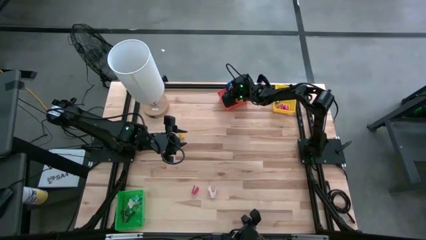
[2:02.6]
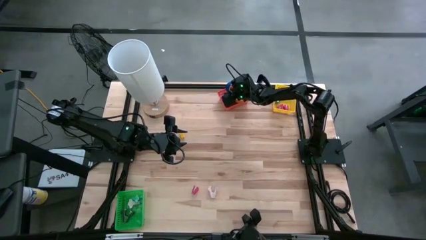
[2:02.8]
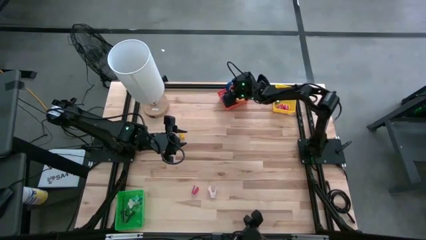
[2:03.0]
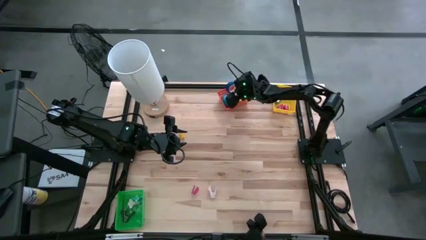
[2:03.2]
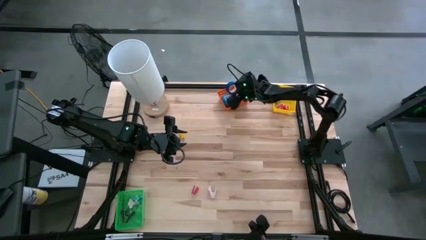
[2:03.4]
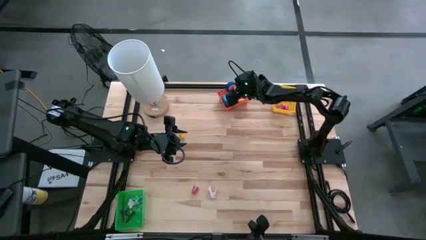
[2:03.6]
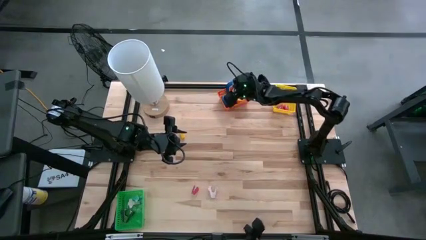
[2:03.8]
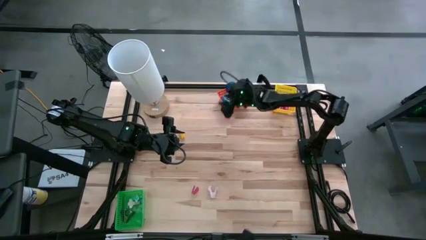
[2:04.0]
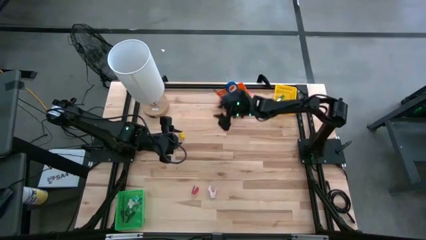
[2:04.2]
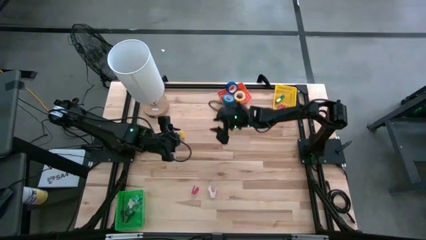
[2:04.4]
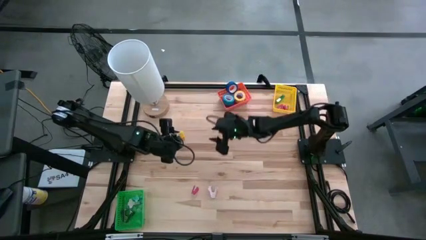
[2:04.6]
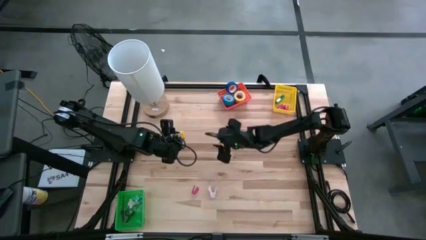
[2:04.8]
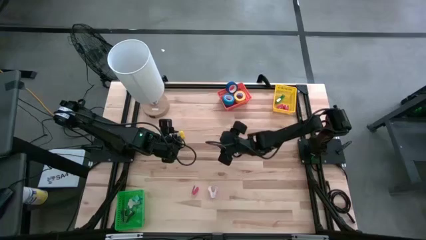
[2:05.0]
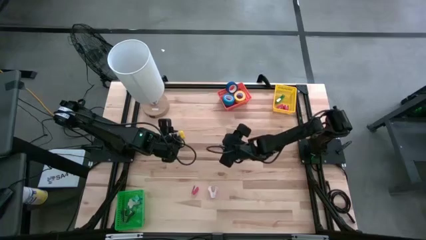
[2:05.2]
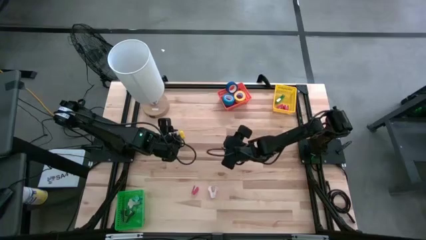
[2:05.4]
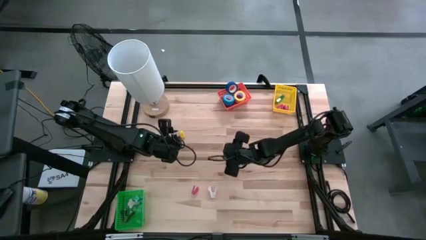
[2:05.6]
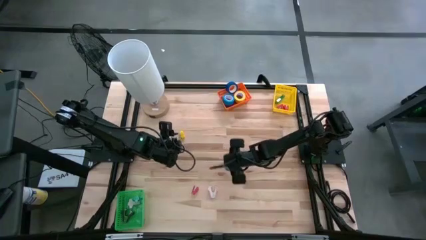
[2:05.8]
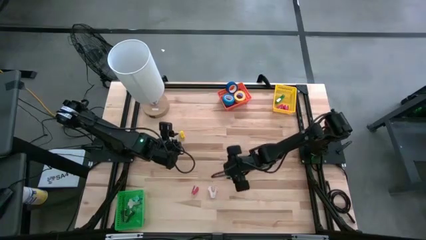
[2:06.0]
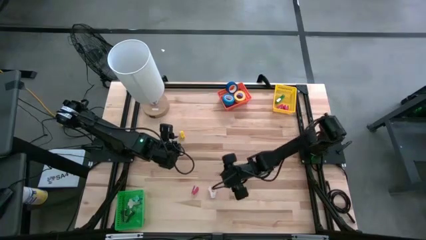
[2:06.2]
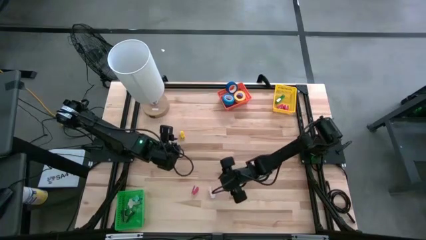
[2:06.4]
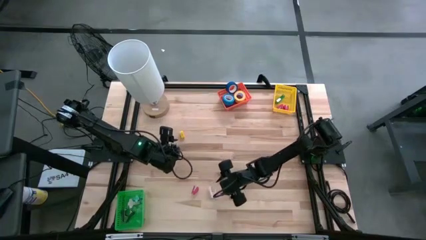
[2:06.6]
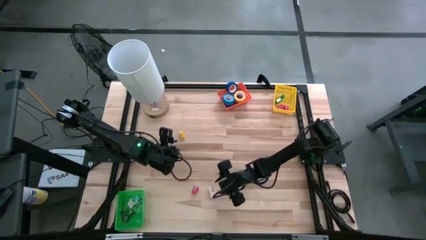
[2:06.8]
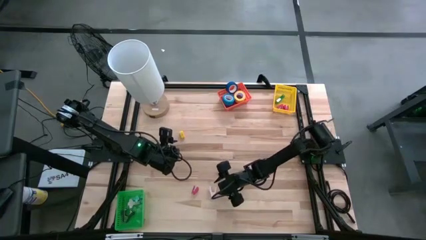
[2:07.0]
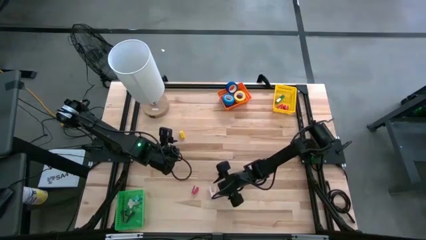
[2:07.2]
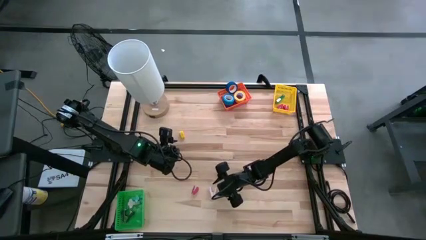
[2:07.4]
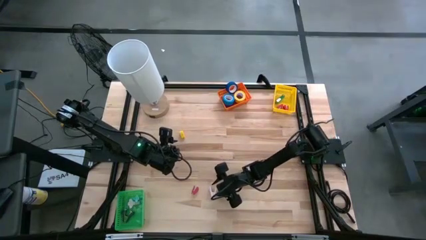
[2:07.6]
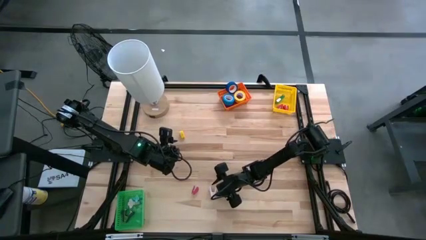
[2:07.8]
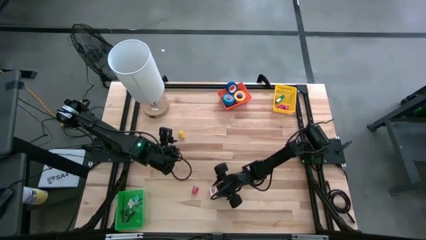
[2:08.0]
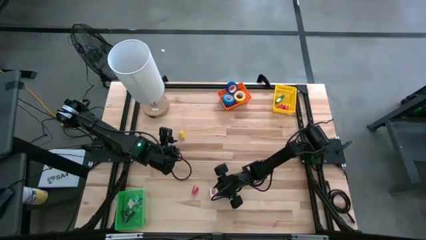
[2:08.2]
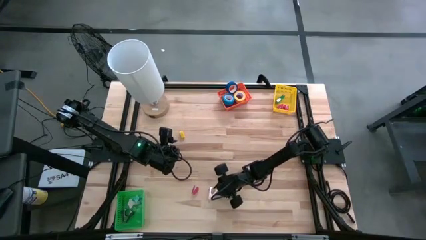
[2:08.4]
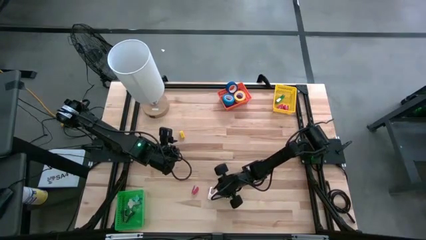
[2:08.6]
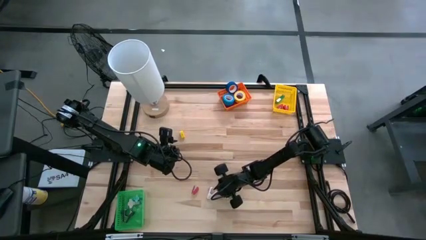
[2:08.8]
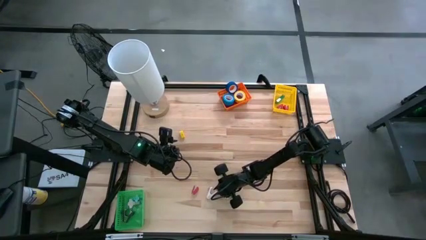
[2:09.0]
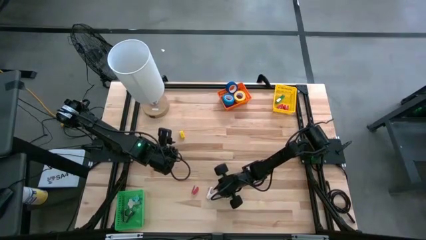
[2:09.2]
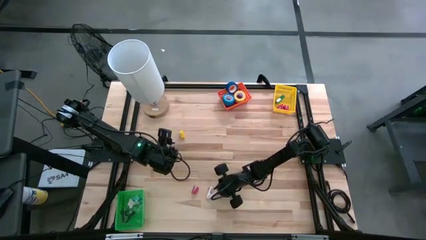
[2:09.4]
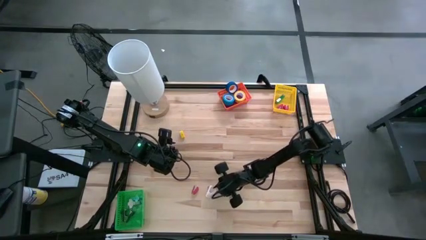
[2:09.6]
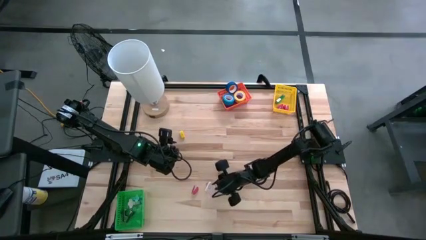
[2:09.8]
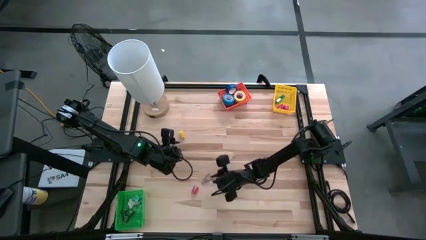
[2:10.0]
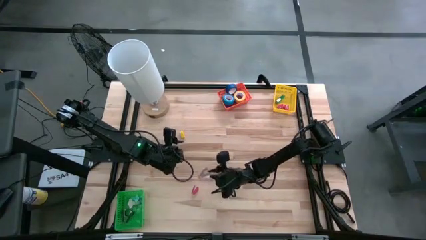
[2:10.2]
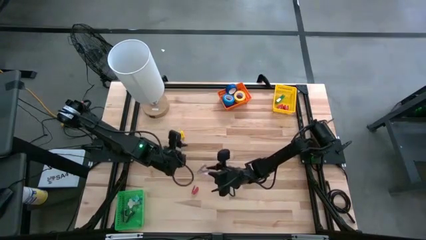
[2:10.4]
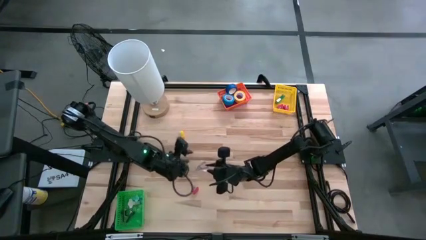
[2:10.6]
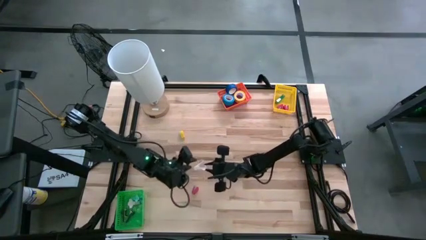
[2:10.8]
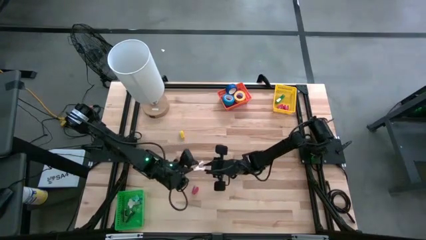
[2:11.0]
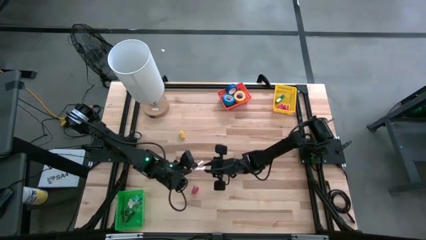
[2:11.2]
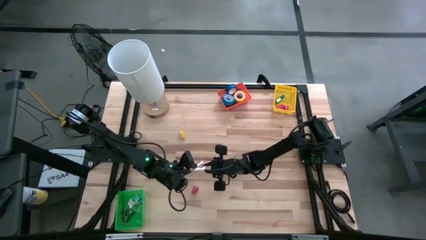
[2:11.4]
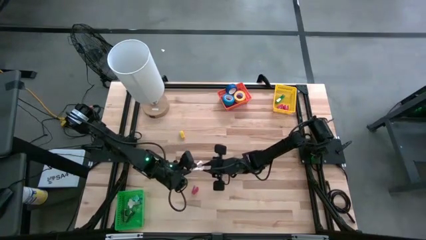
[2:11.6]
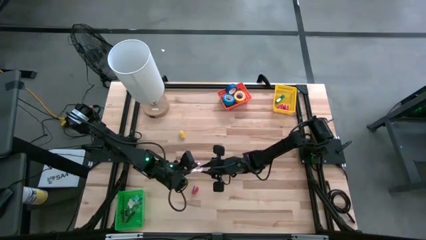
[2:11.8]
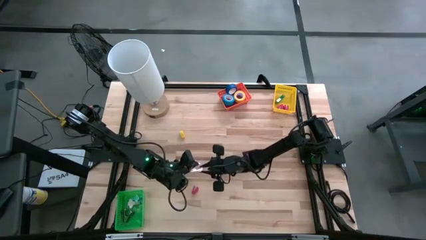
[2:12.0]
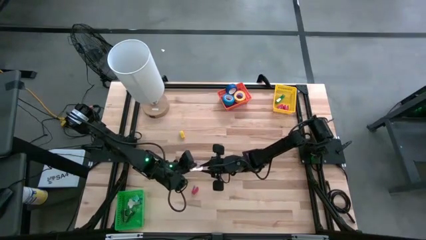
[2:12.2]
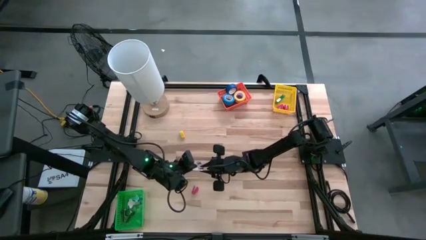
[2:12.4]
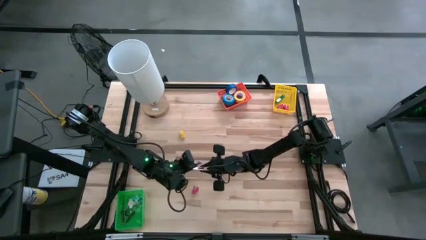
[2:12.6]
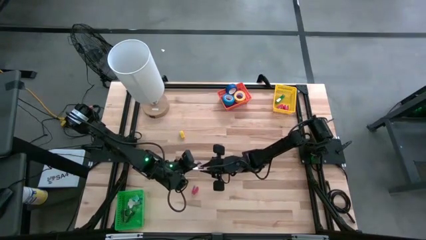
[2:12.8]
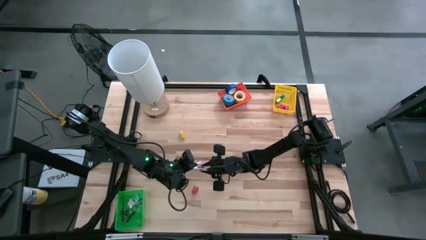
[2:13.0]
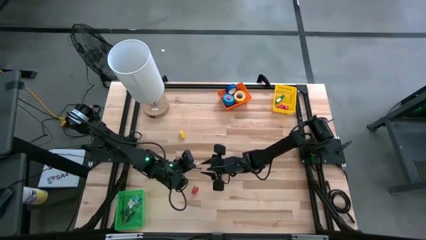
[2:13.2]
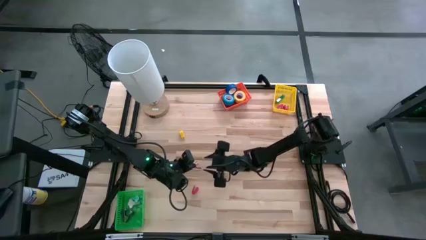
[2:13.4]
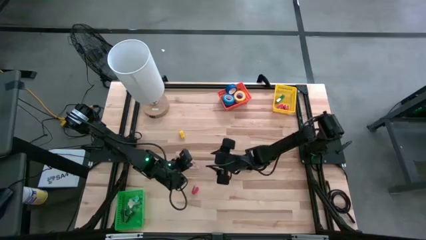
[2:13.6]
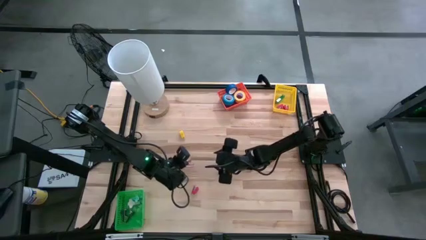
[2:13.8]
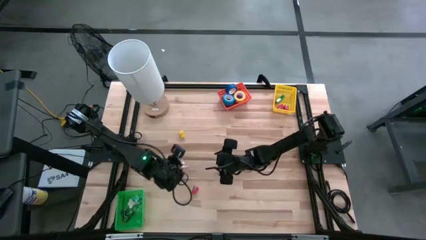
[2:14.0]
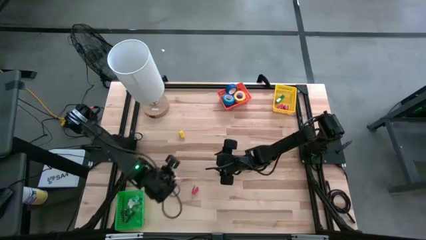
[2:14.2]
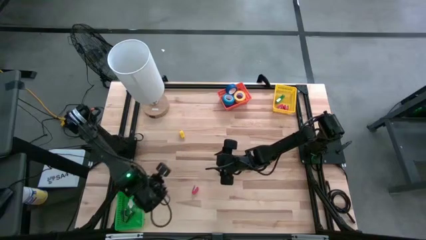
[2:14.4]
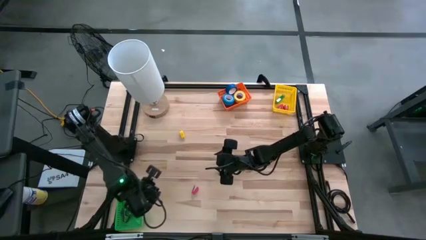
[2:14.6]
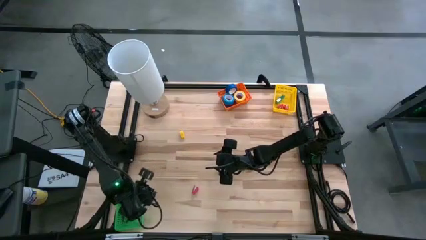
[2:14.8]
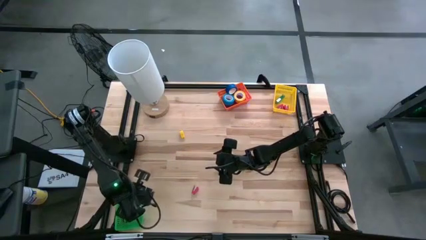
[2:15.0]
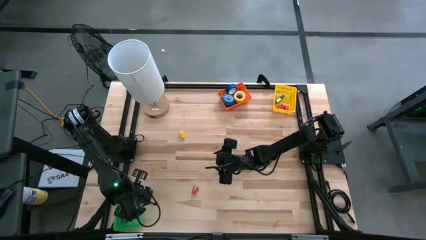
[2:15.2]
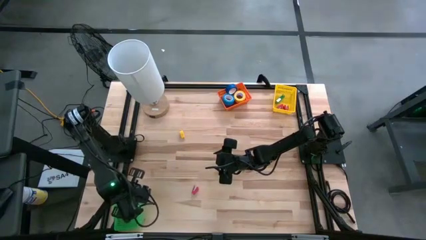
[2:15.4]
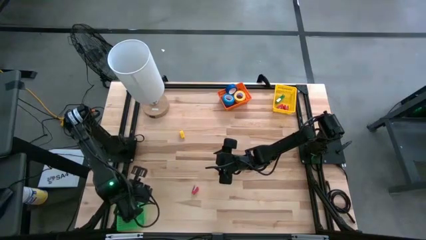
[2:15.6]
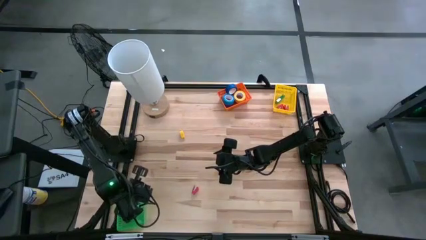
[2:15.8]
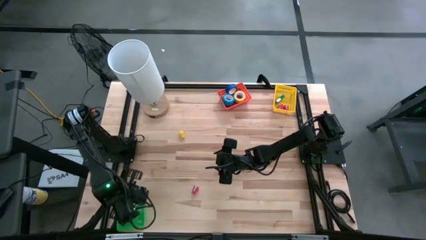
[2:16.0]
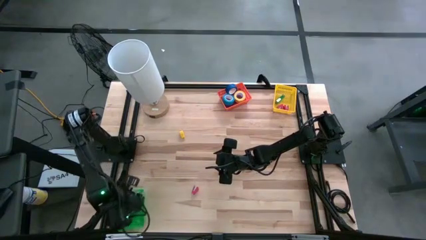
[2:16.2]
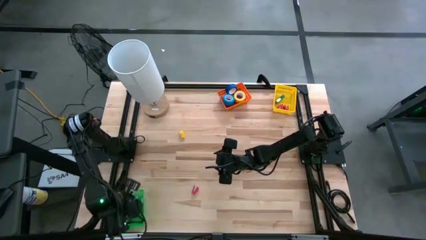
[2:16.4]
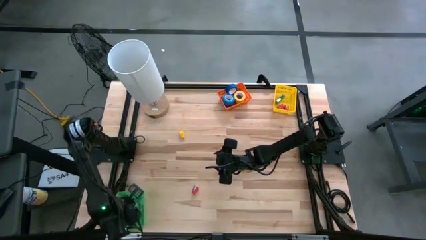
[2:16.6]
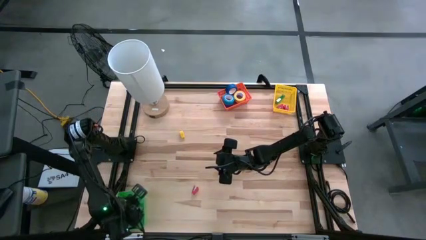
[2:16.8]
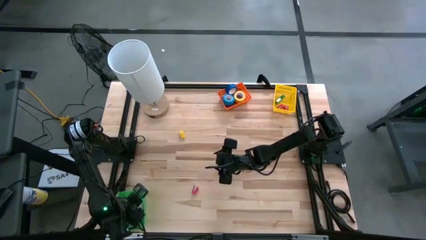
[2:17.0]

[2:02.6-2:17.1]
Task: Pick and place Stapler, Stapler remover, tape
Put the pink staple remover into the green bin

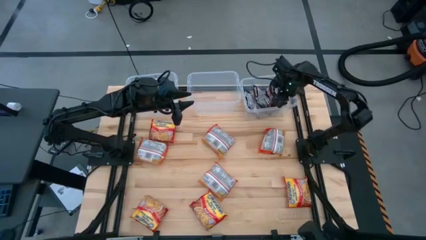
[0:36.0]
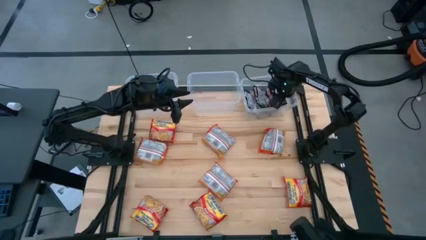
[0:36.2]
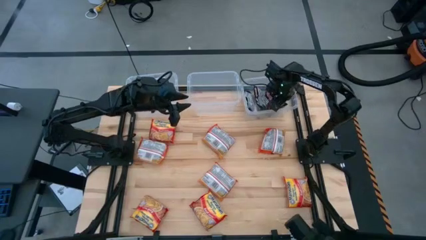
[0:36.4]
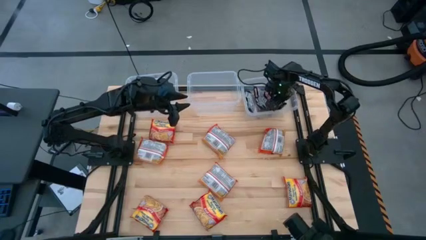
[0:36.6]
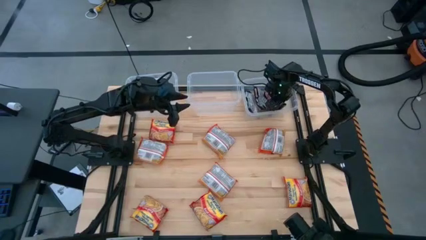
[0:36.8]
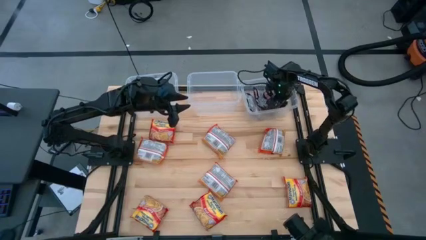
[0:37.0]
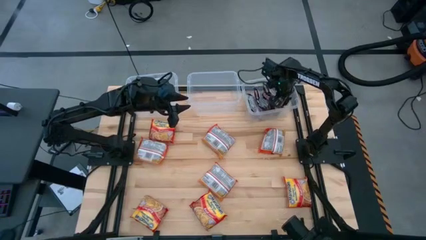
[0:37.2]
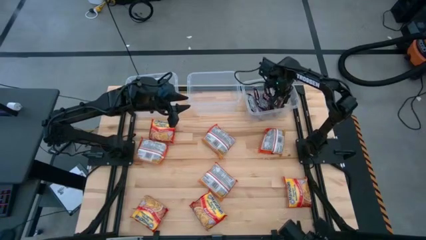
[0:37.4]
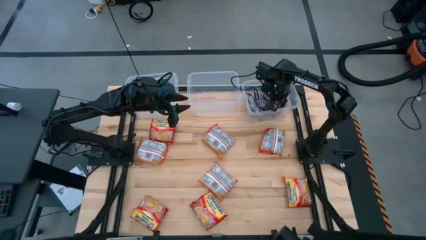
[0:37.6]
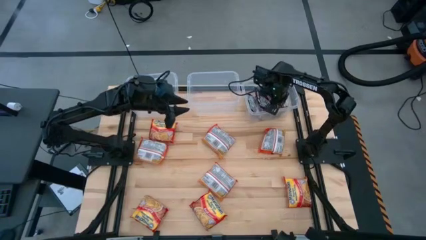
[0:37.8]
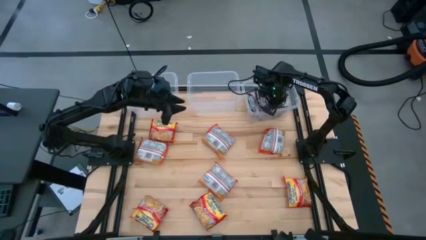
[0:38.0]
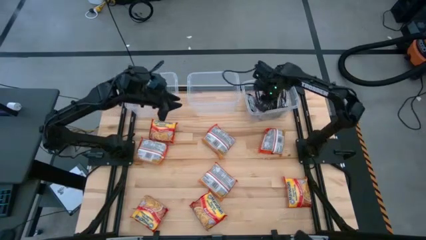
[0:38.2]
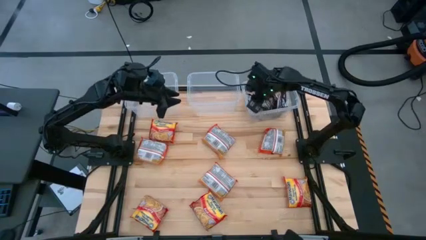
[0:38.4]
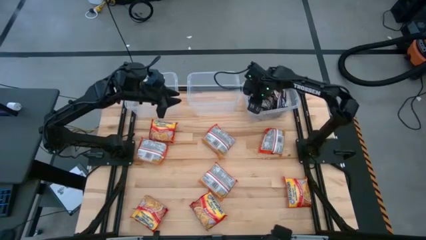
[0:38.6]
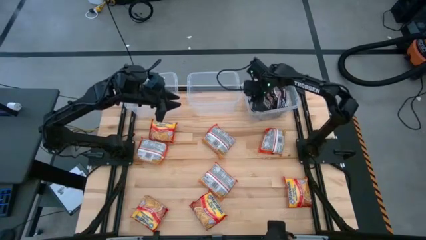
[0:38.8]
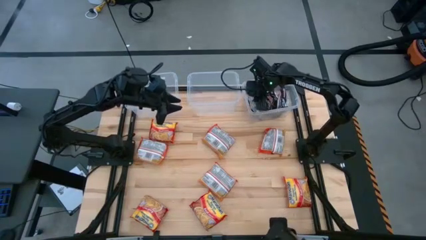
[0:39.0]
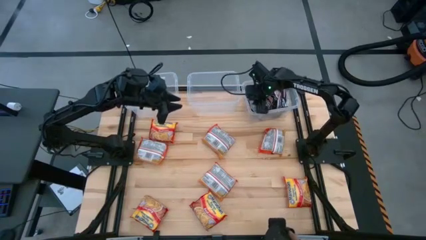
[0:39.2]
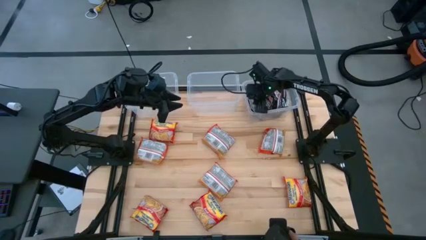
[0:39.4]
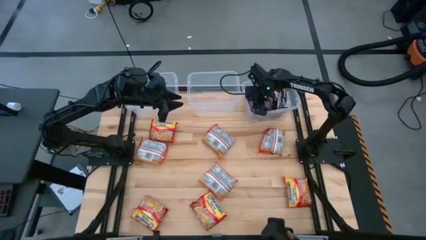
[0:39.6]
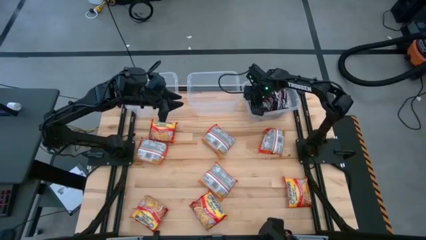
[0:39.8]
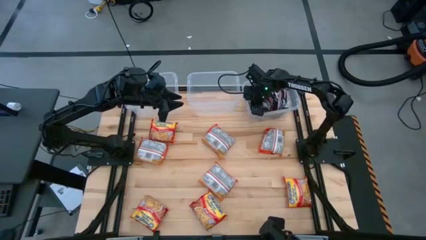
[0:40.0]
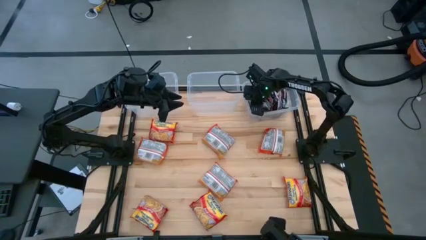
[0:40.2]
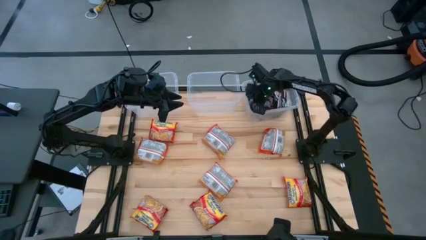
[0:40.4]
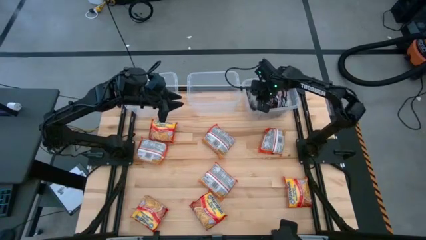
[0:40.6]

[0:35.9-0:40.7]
Task: Sort Maruchan noodles
Adjust the noodles on the right transparent bin
